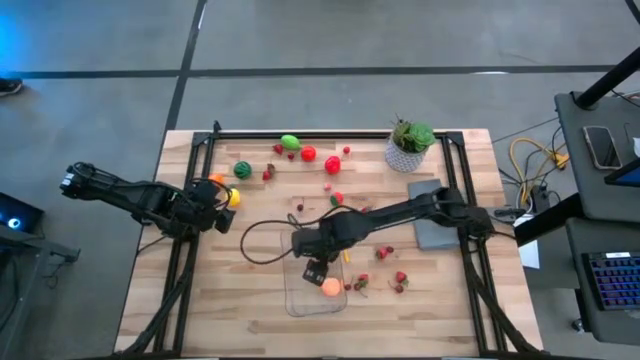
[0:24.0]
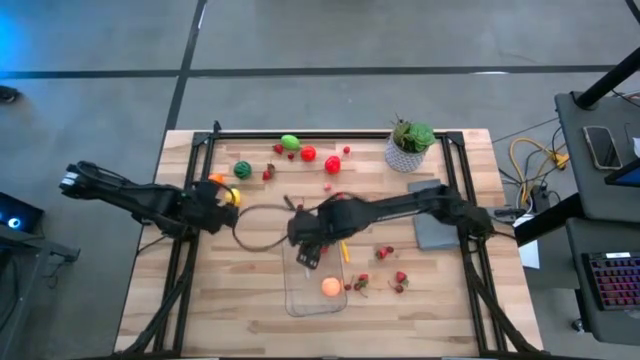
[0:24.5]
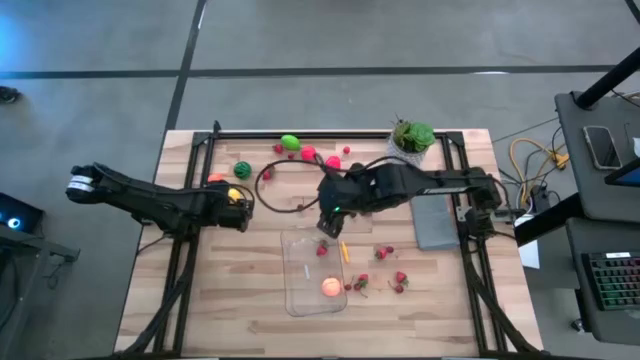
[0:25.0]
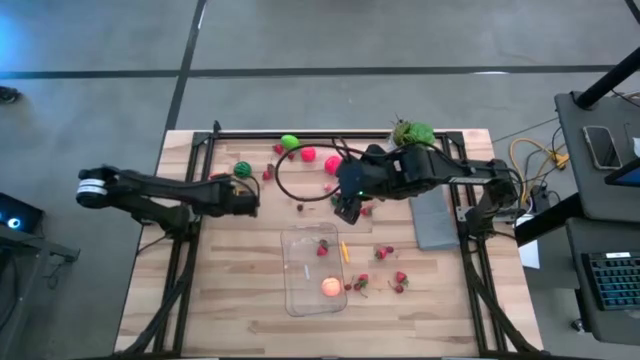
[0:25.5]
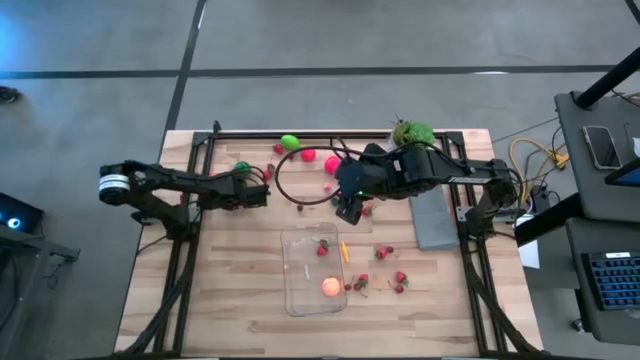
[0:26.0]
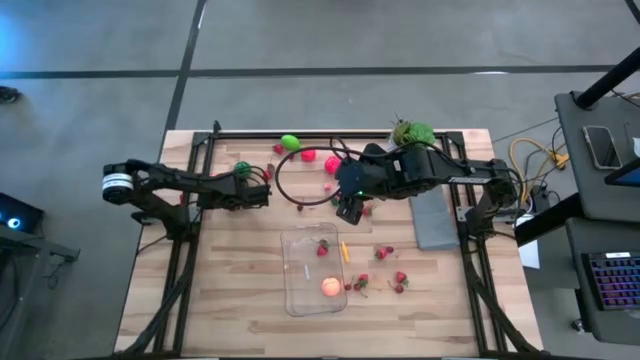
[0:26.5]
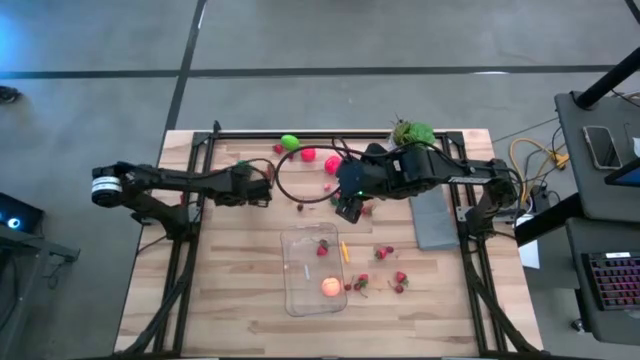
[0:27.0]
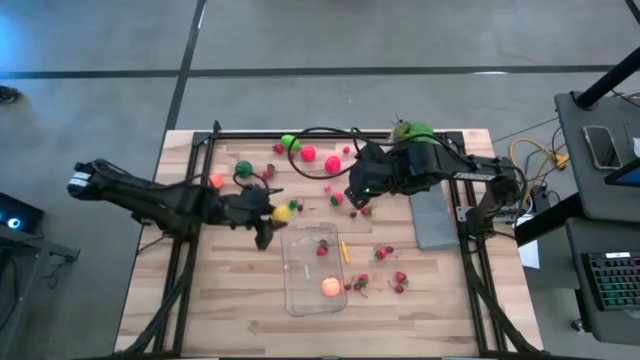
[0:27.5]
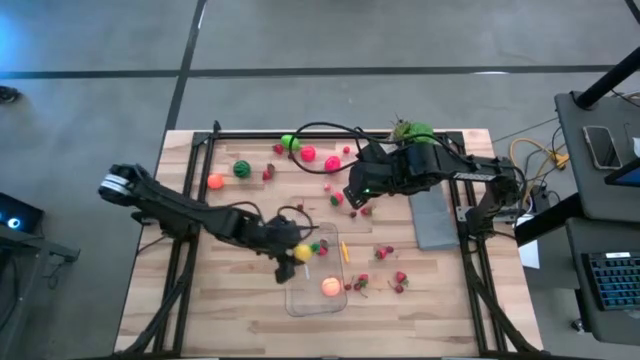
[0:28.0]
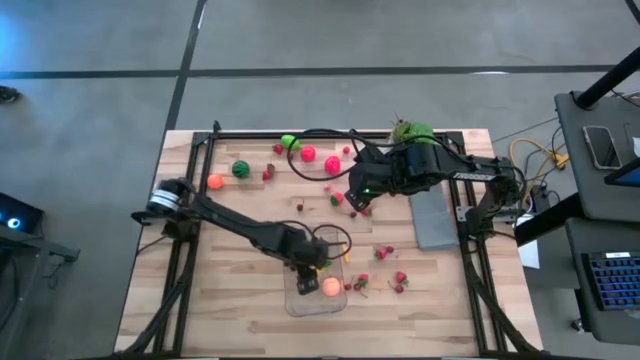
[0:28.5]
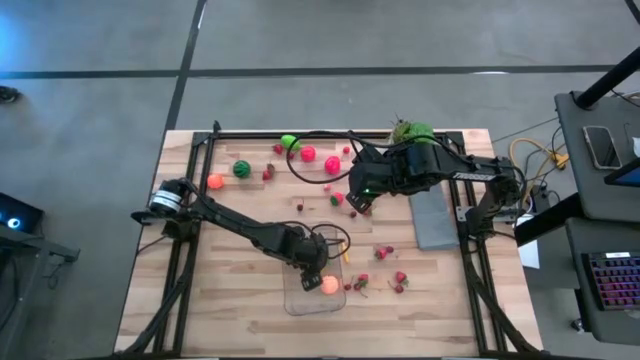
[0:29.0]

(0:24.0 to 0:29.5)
Task: Pick and placing Produce into tupperware
Put the yellow pineapple into the transparent bin

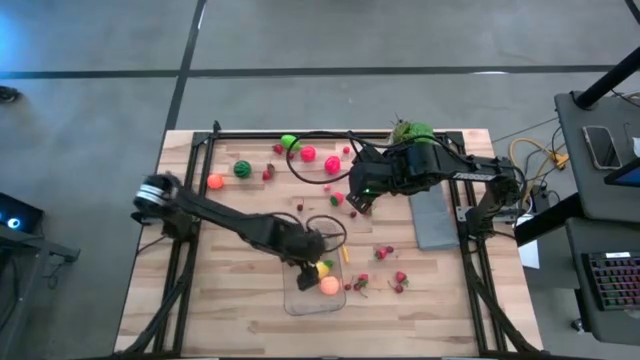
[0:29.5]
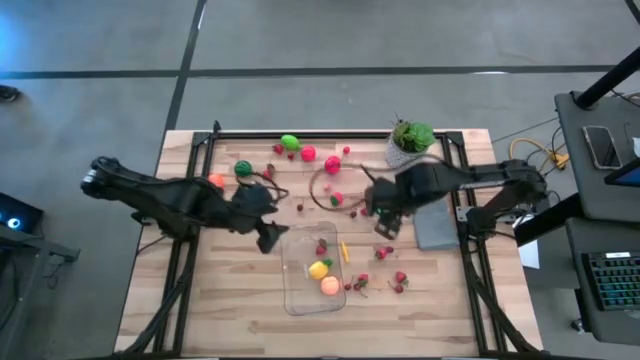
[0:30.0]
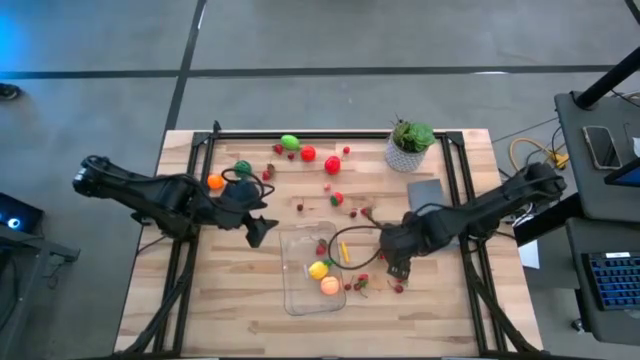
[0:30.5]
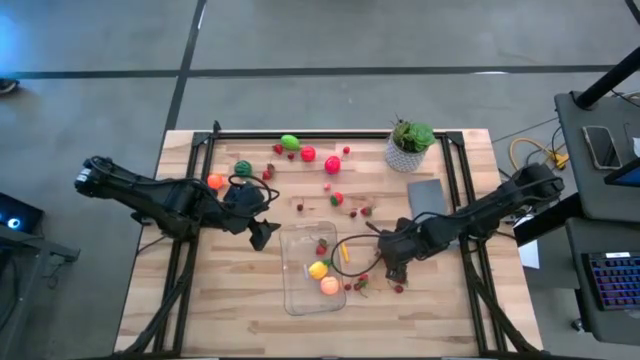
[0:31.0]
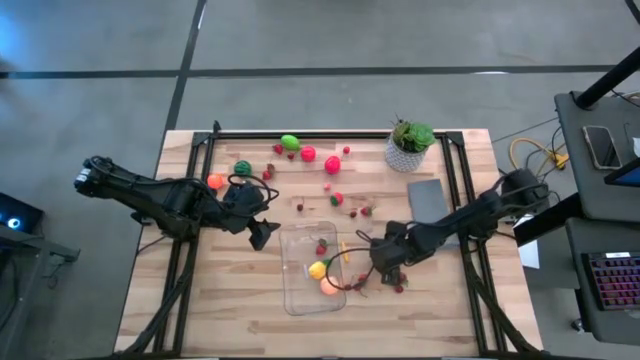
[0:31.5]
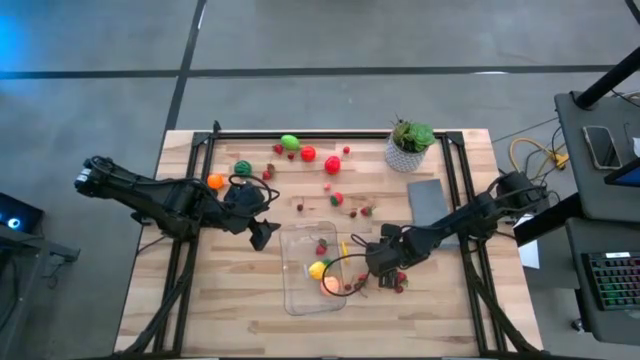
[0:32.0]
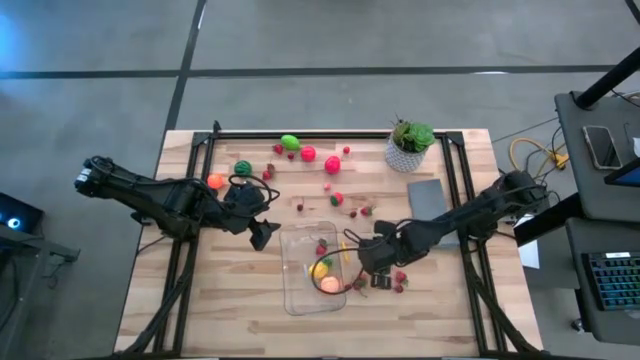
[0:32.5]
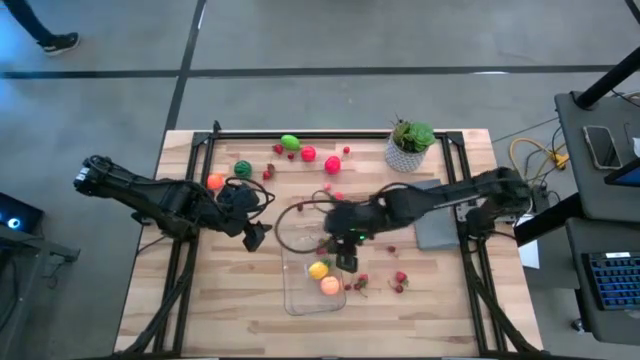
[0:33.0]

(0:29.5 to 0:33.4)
Put the red strawberry into the transparent bin

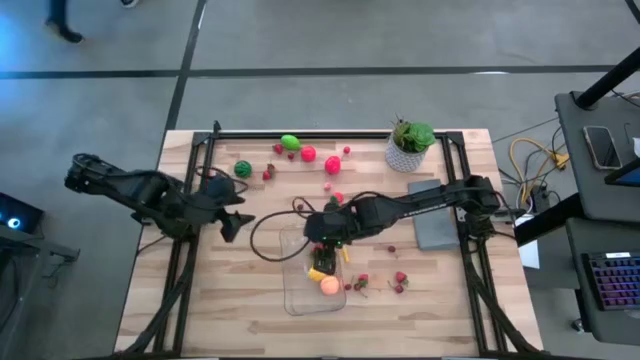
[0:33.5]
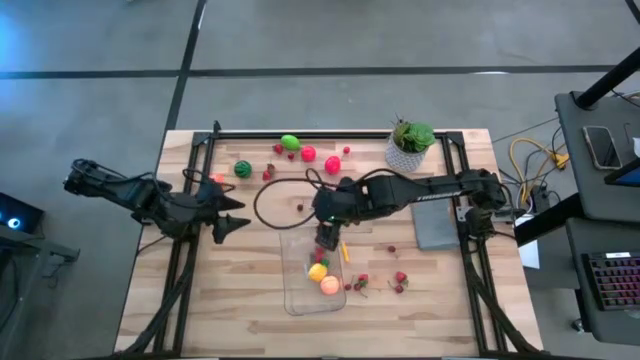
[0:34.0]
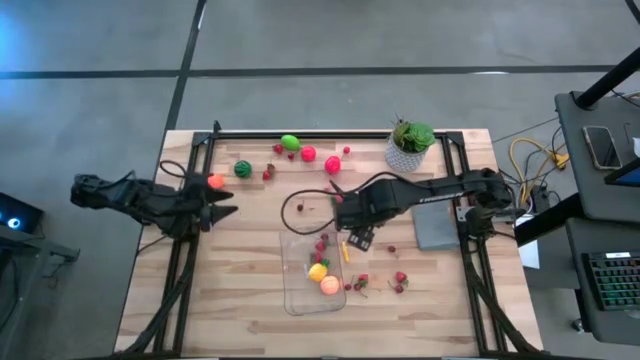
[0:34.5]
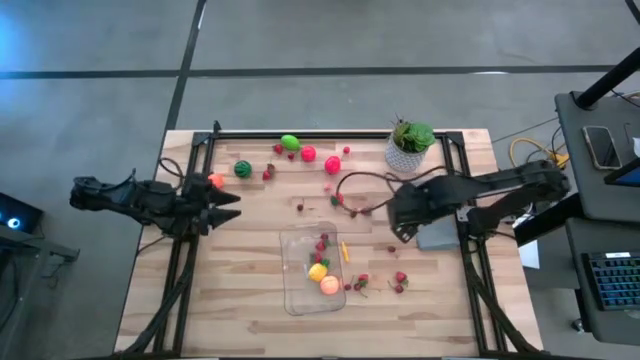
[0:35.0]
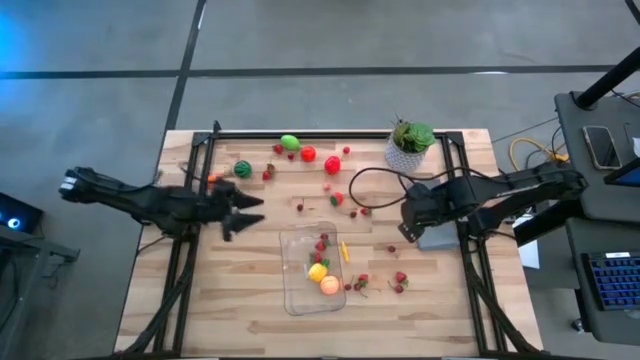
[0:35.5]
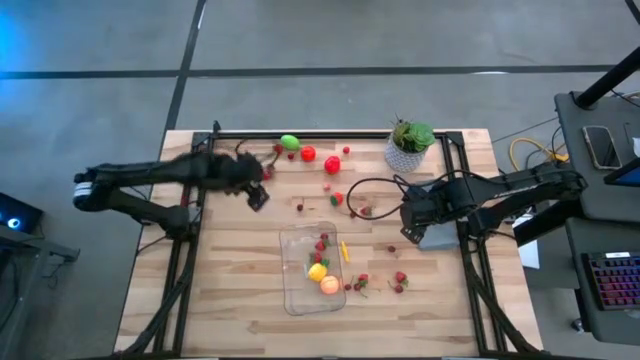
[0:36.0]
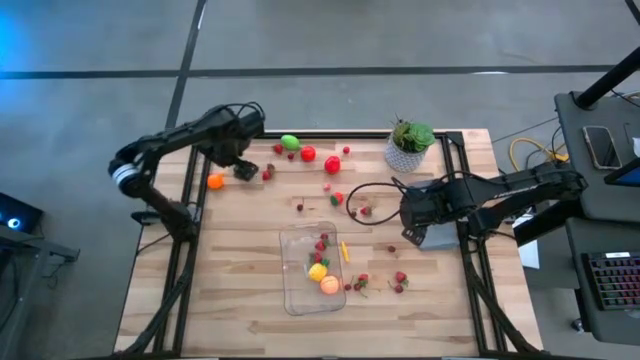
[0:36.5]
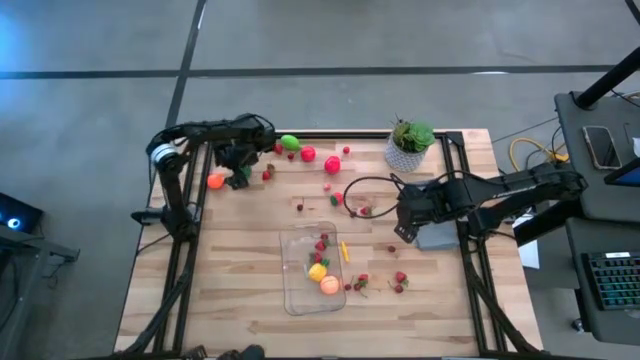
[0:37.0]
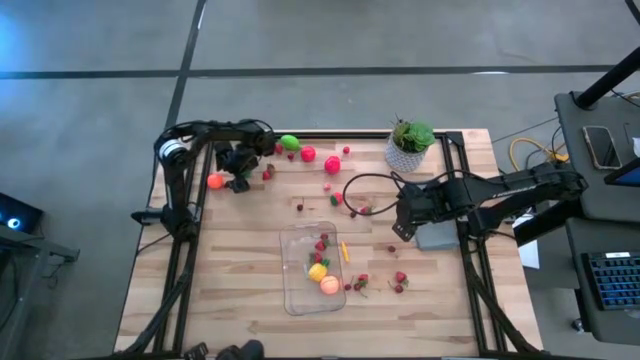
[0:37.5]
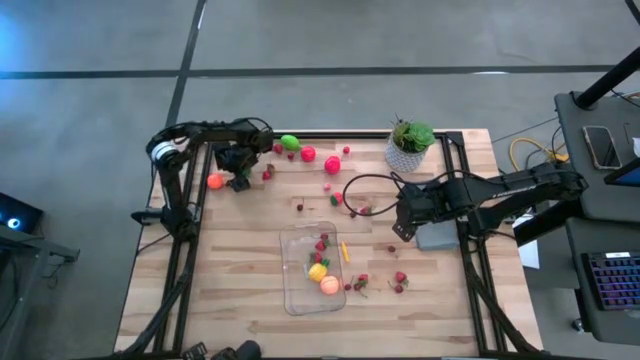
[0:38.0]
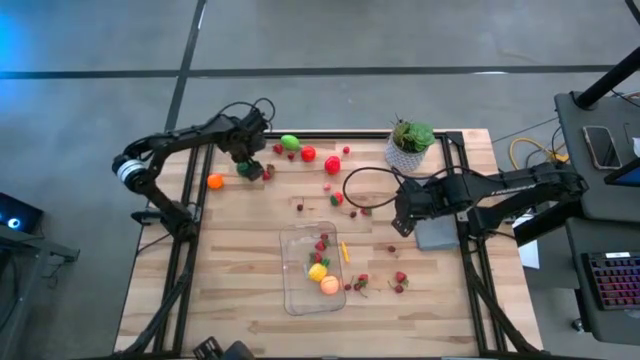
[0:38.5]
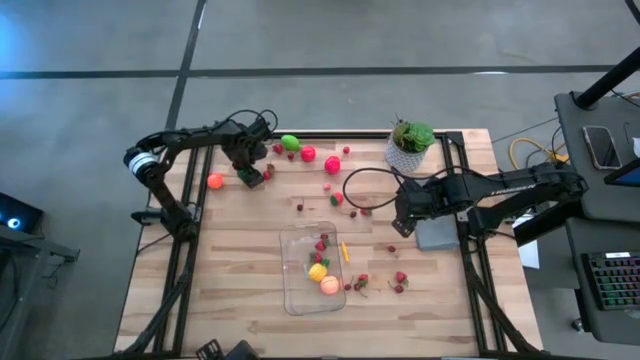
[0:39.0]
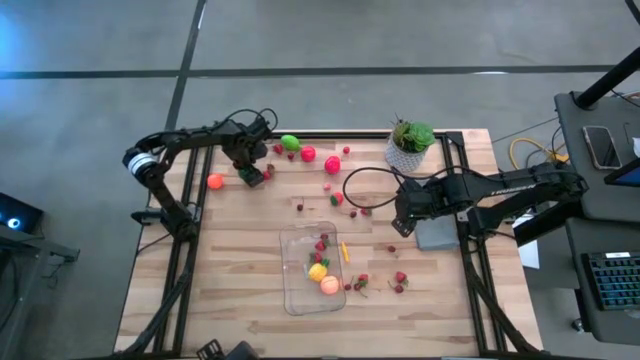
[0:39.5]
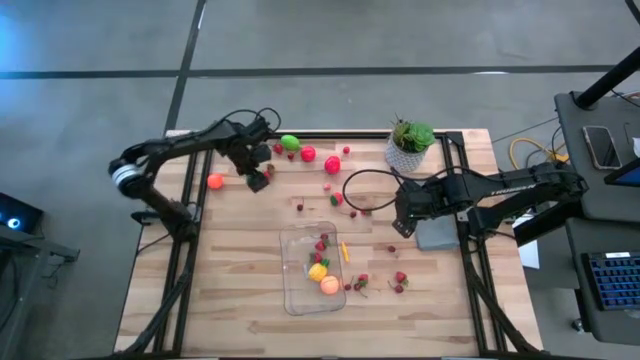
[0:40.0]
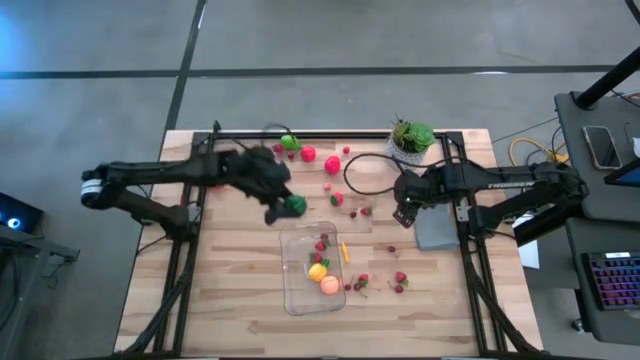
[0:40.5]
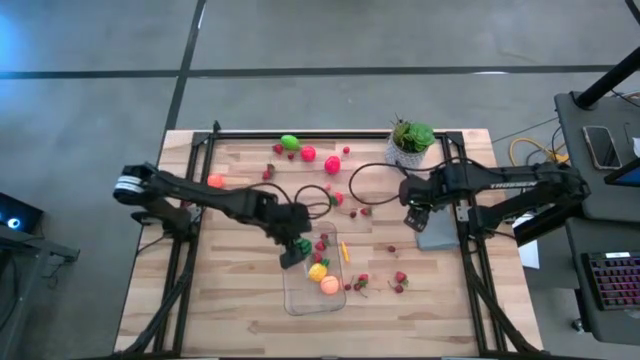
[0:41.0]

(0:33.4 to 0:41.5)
Put the green watermelon into the transparent bin

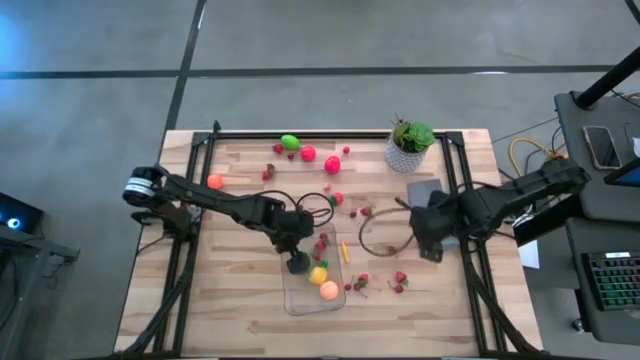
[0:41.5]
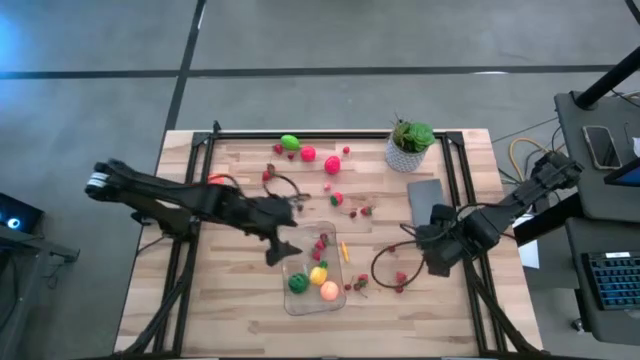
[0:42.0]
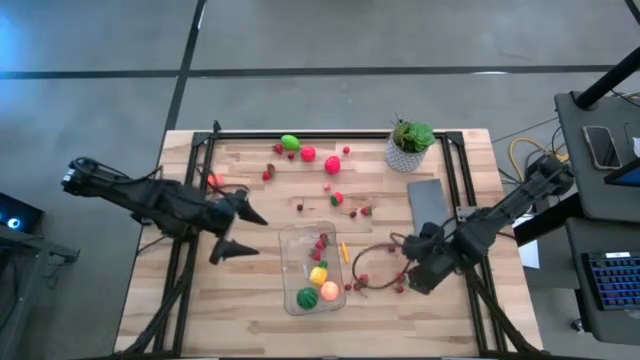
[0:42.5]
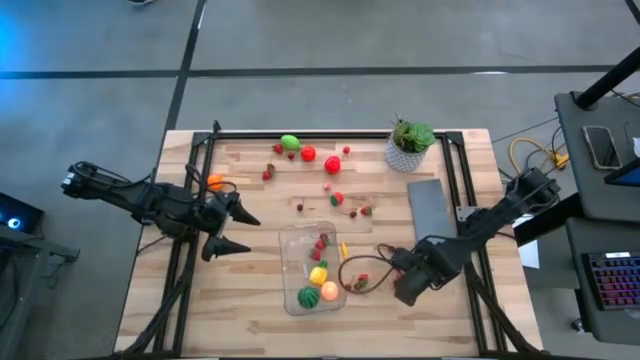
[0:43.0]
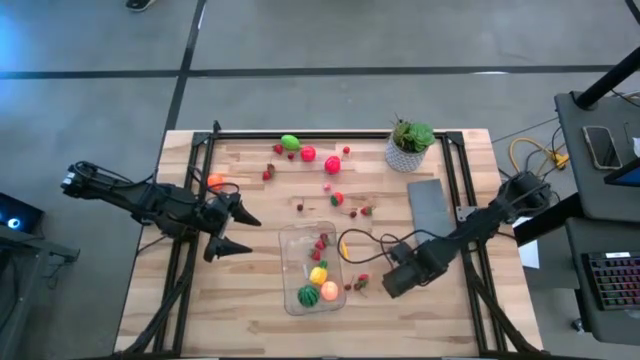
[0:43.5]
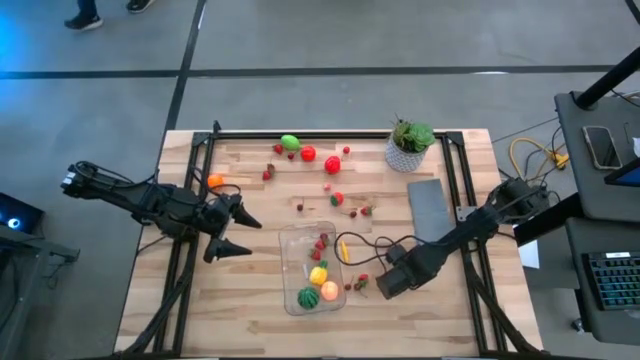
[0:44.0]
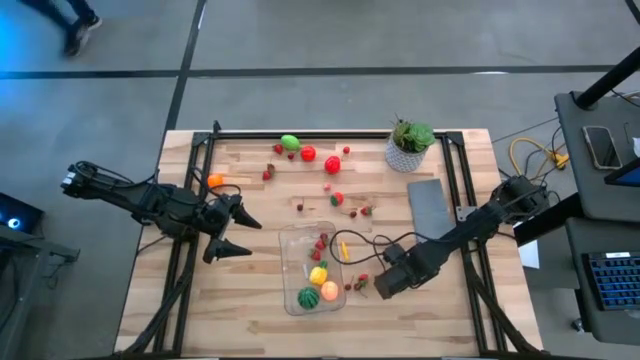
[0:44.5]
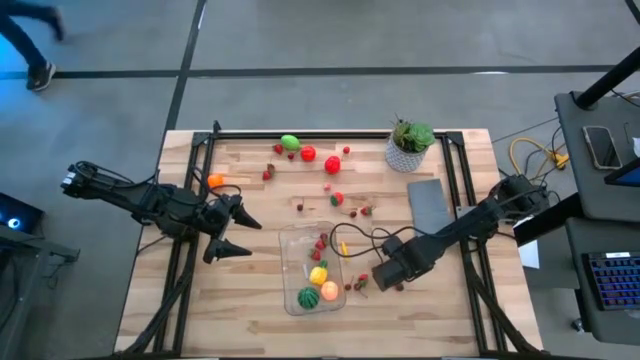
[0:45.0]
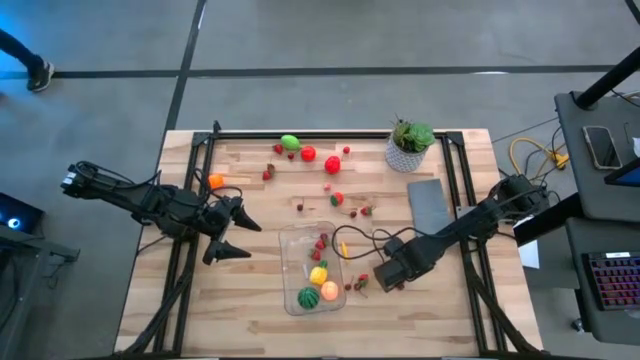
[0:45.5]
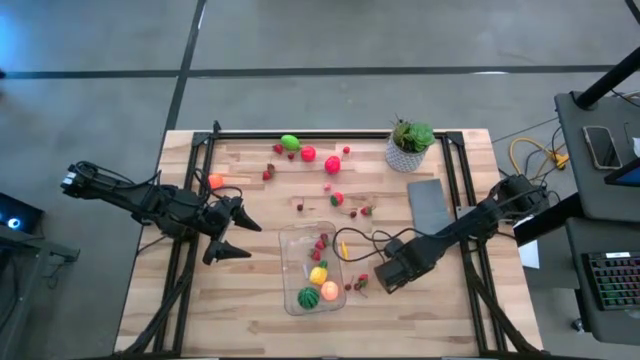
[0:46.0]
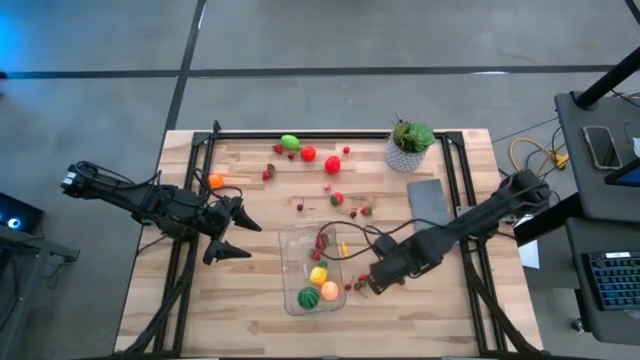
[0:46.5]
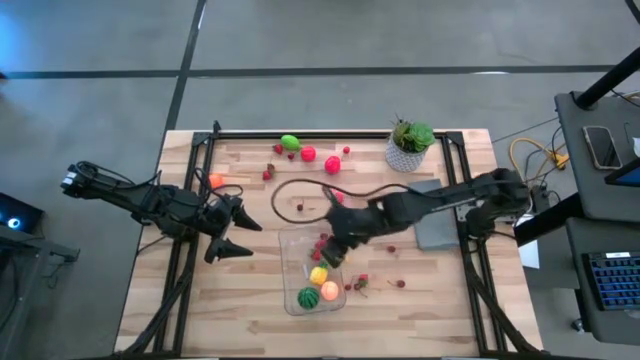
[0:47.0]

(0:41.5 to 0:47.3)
Put the red strawberry into the transparent bin
